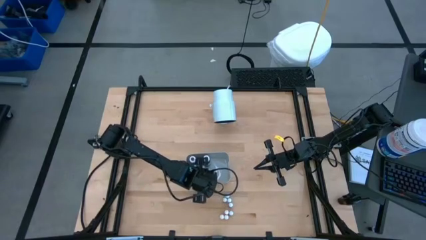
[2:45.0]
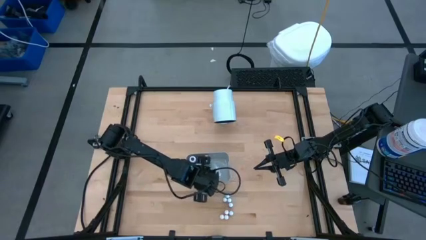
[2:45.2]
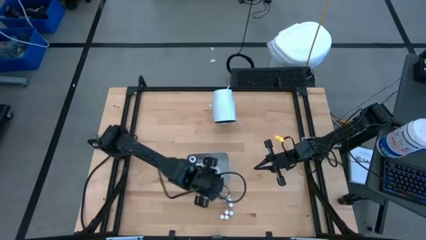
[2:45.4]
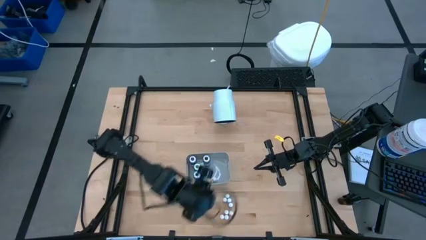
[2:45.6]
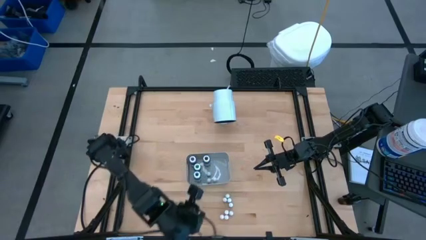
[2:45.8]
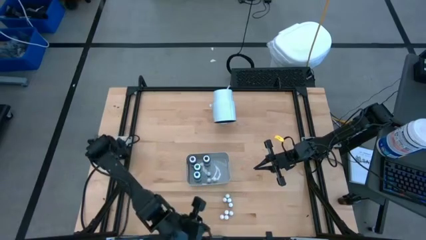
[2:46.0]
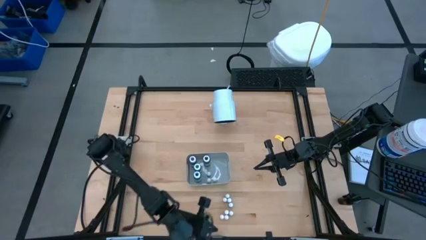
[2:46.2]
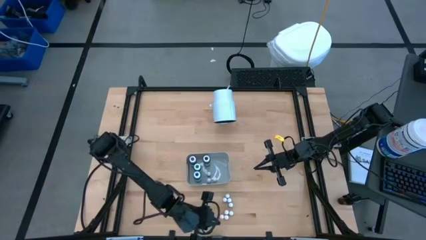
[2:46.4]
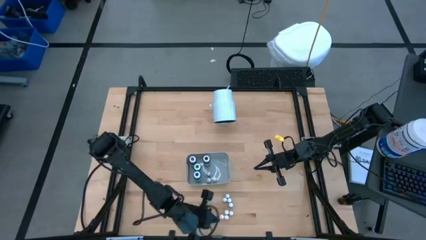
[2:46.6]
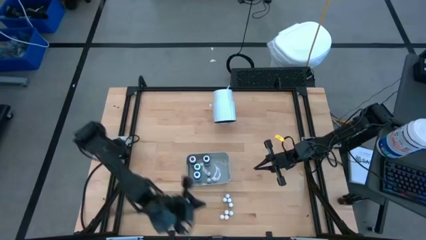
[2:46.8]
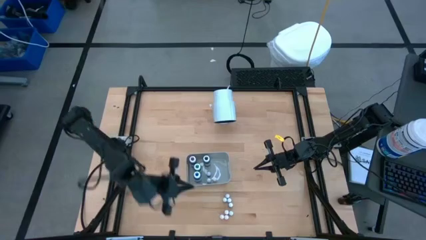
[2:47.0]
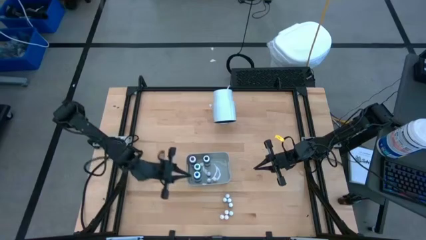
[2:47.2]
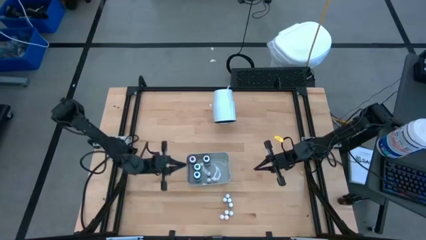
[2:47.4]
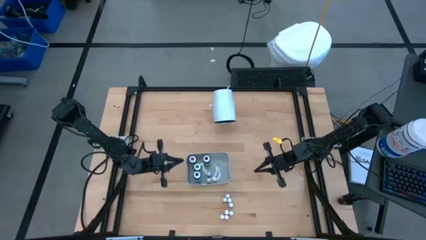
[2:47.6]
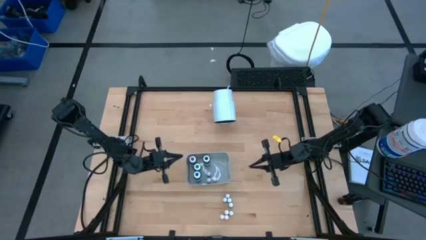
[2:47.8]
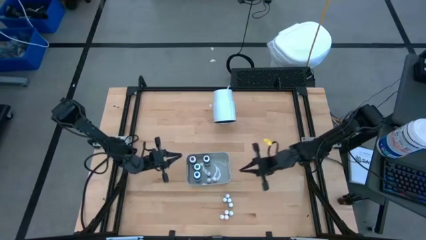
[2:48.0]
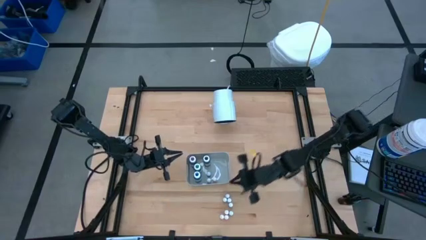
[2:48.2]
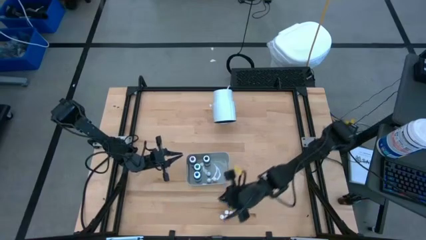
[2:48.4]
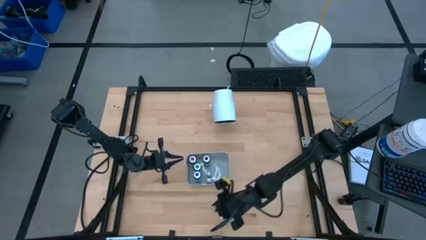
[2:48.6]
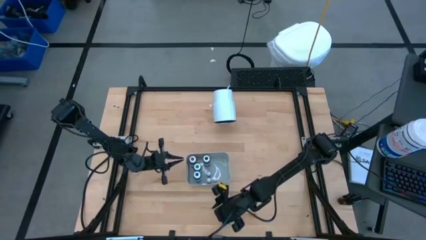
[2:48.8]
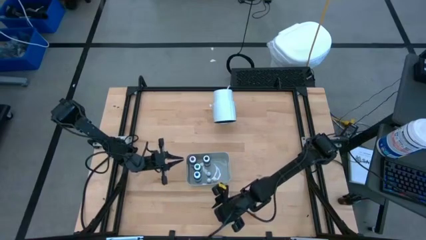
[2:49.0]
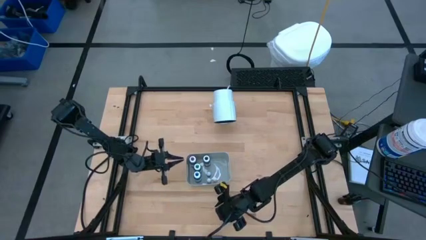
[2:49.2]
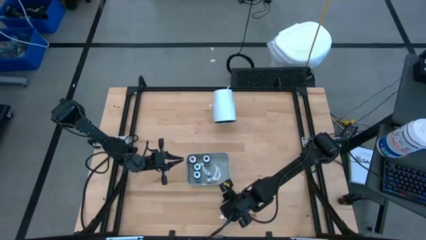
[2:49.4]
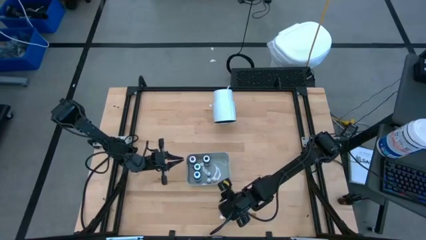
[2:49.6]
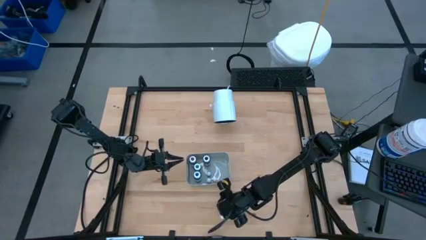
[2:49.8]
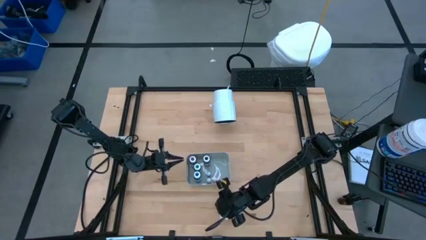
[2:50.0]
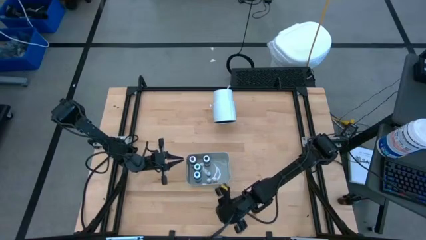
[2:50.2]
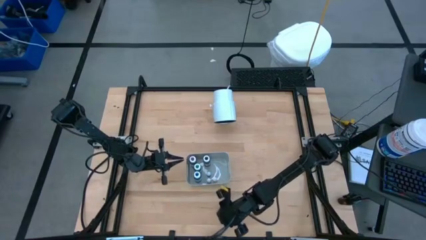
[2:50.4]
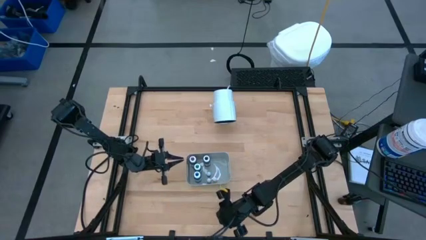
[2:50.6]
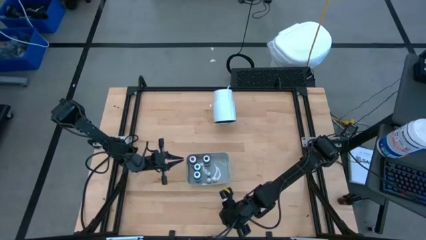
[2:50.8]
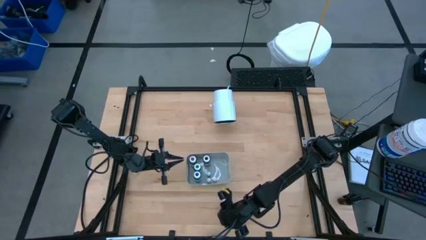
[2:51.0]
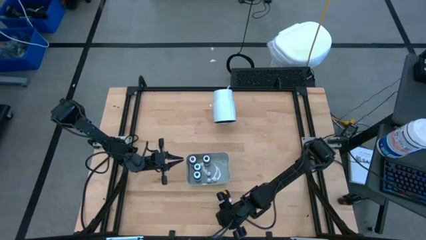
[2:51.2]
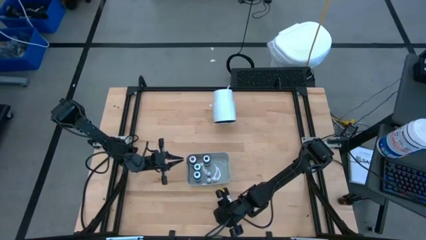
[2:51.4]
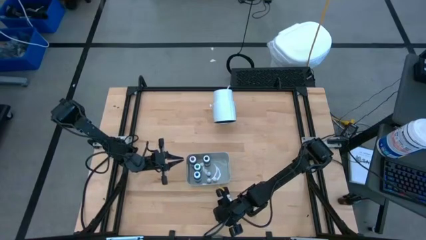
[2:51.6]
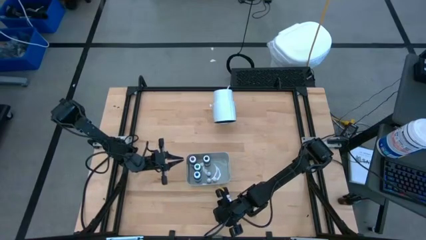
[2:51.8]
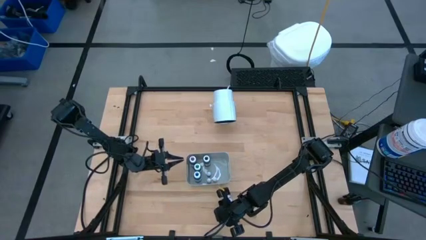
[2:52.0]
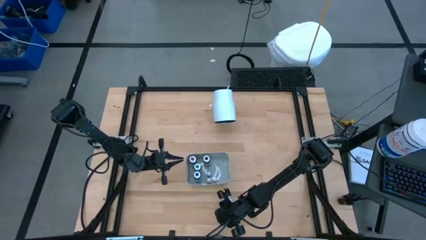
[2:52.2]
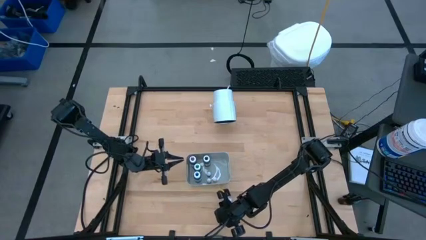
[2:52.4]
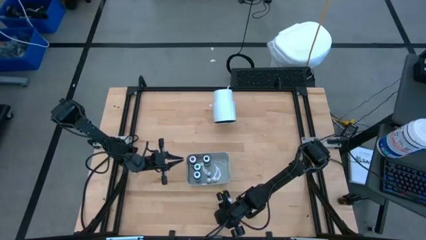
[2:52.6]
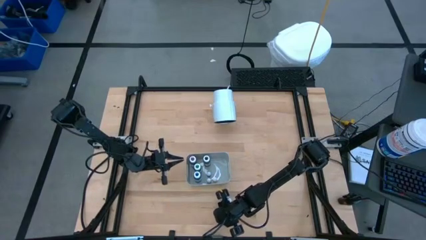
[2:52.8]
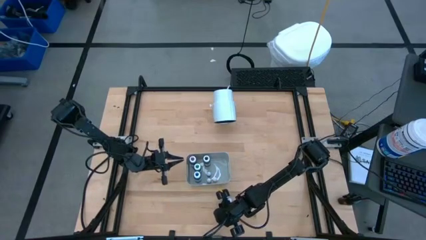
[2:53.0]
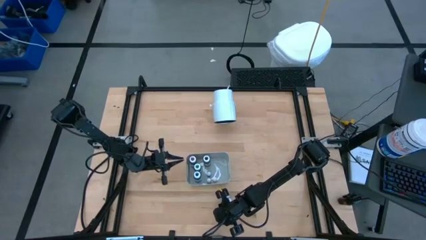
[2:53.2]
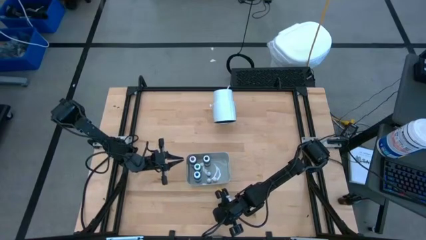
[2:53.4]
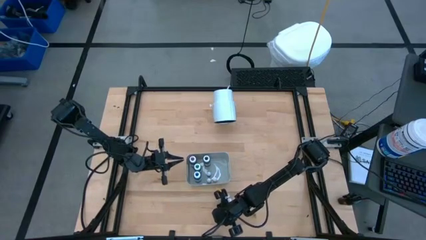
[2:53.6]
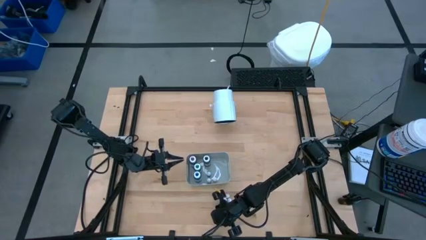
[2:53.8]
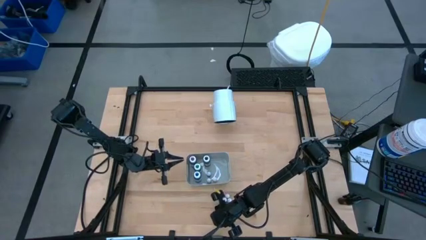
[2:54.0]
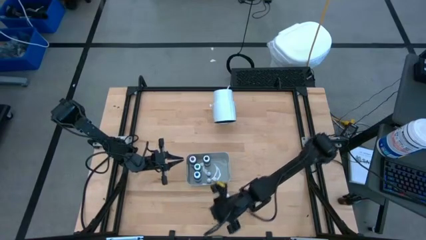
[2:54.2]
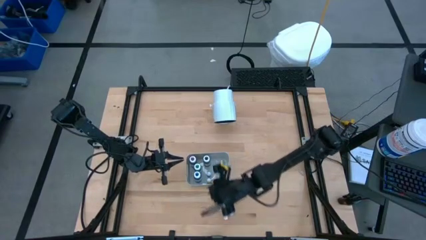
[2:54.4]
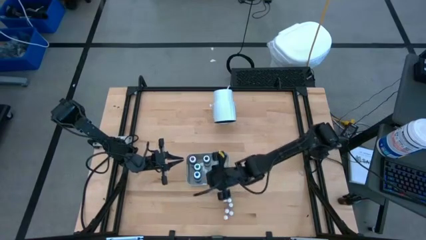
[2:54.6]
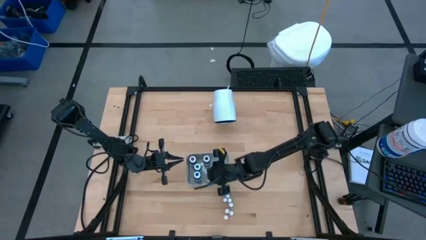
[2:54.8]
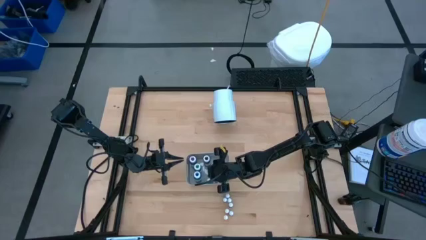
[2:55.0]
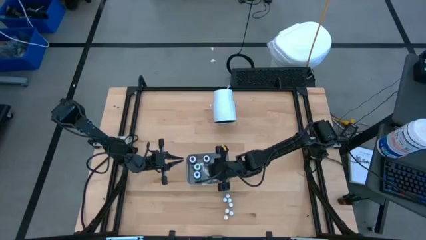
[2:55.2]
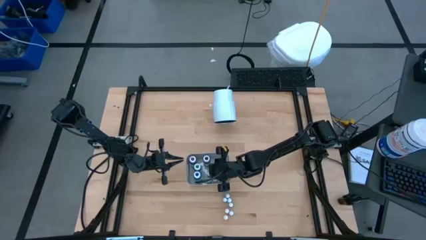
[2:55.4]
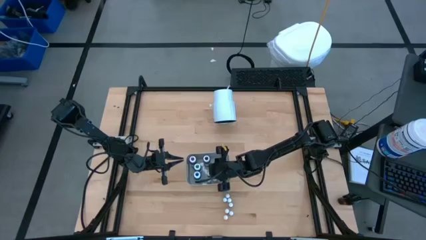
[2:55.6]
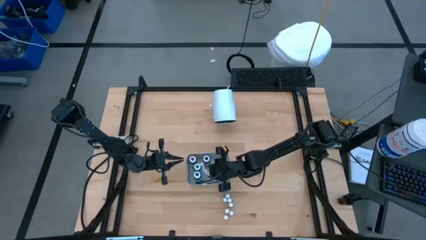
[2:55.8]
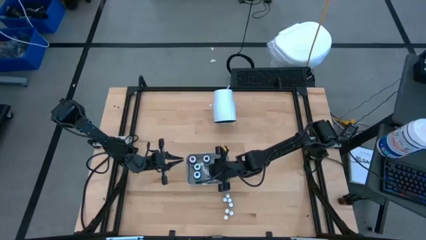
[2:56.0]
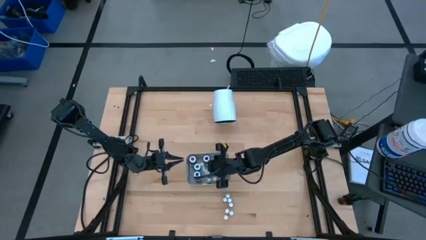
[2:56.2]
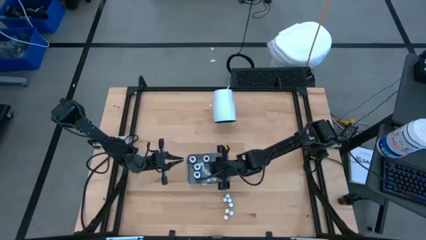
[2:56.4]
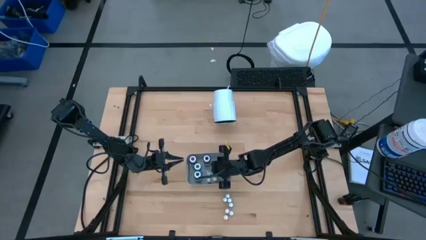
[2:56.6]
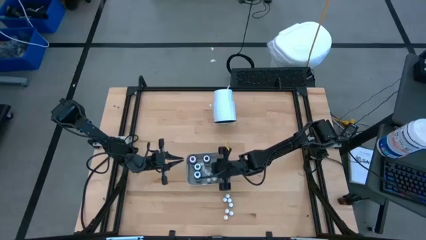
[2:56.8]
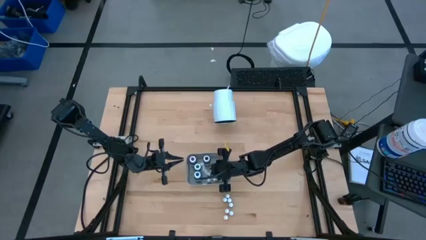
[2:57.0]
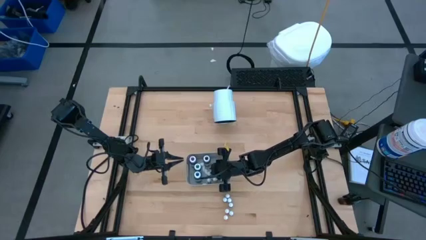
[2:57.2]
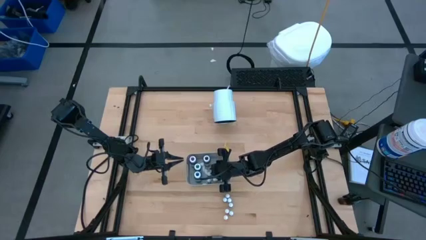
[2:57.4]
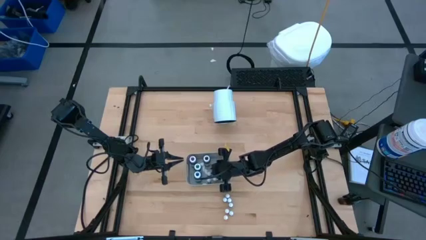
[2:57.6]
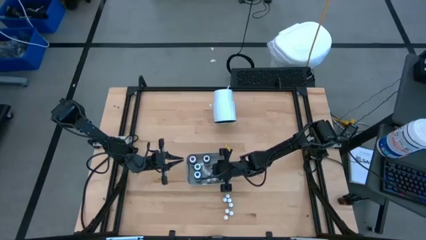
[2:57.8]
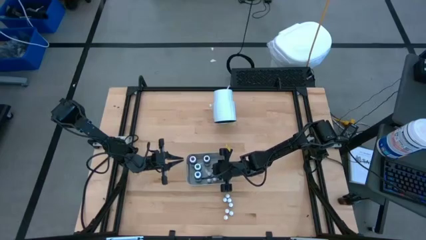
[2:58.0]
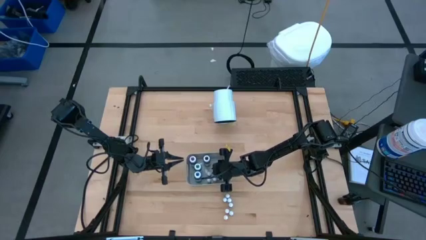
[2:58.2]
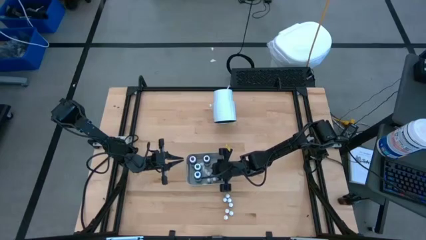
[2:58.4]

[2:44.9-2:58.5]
Task: Pick & Place food coloring
Put the orange food coloring bottle into the gray bin
